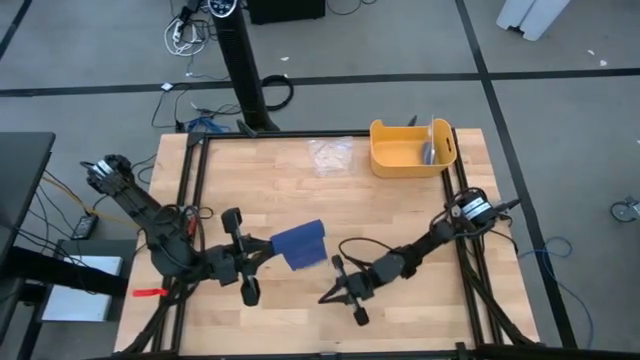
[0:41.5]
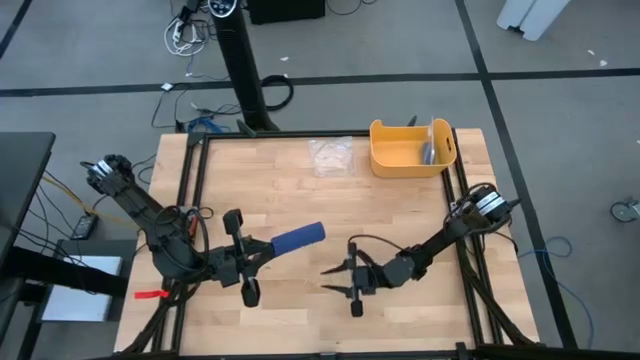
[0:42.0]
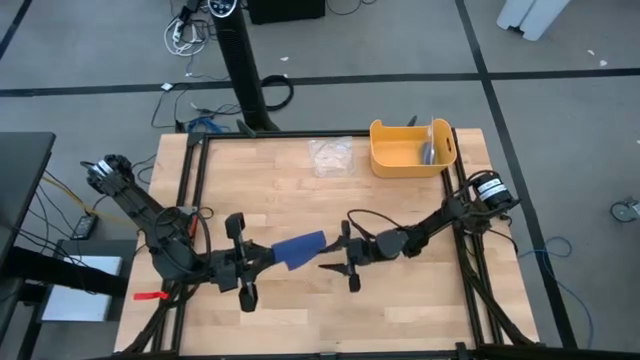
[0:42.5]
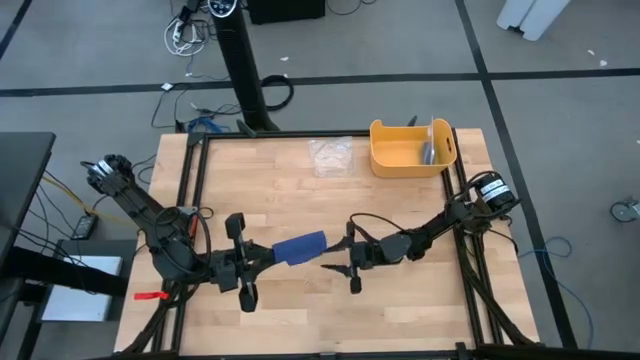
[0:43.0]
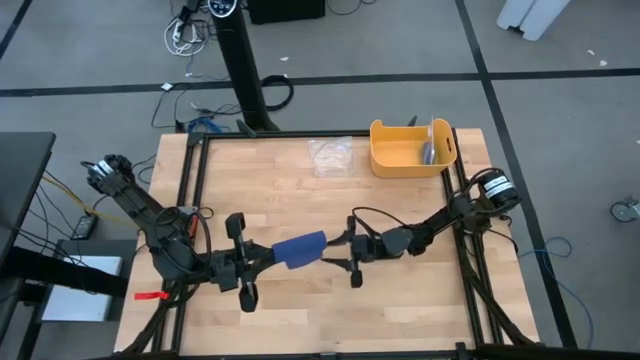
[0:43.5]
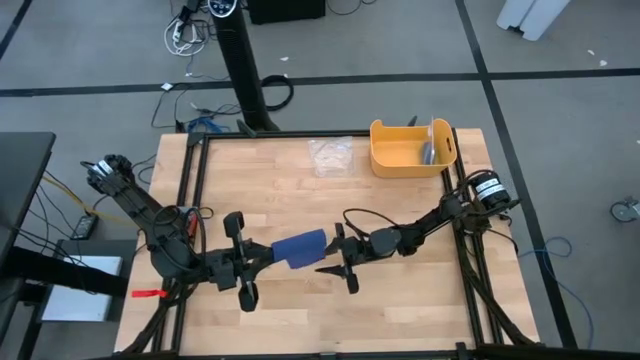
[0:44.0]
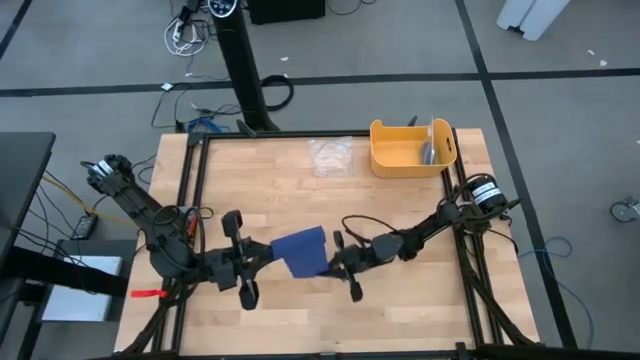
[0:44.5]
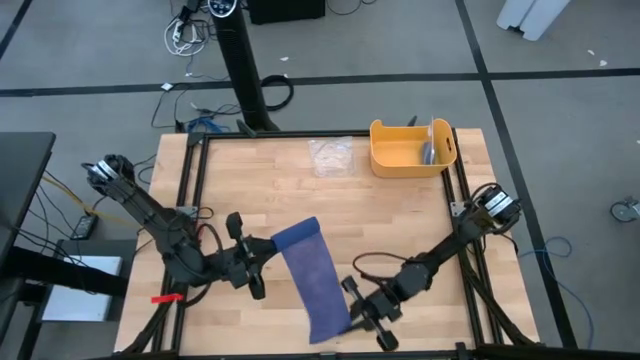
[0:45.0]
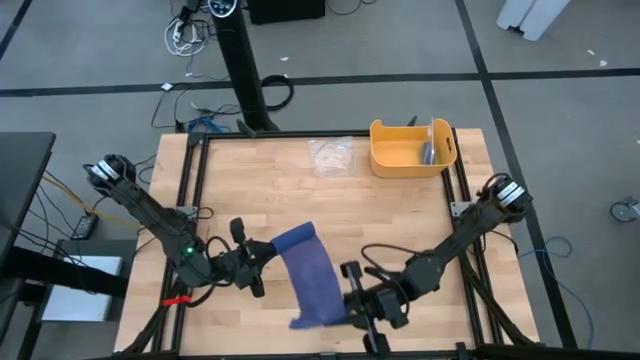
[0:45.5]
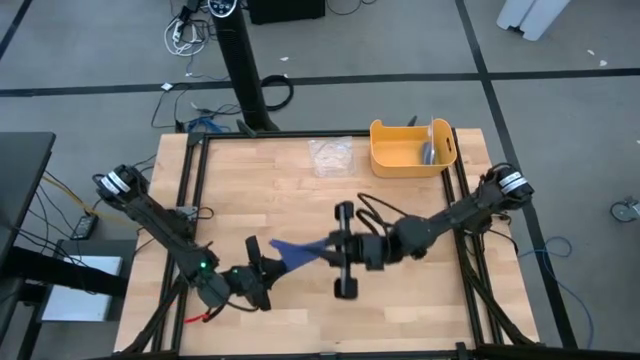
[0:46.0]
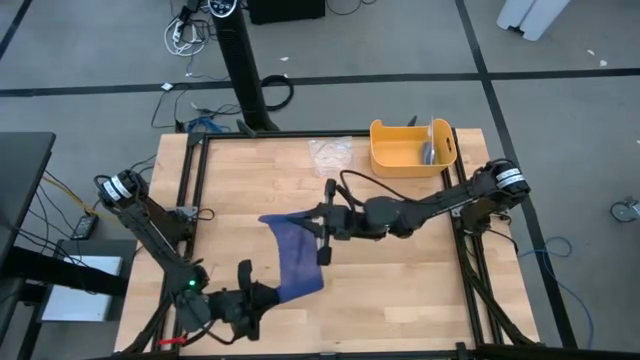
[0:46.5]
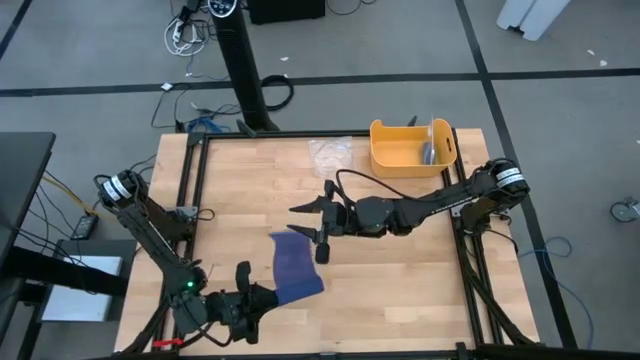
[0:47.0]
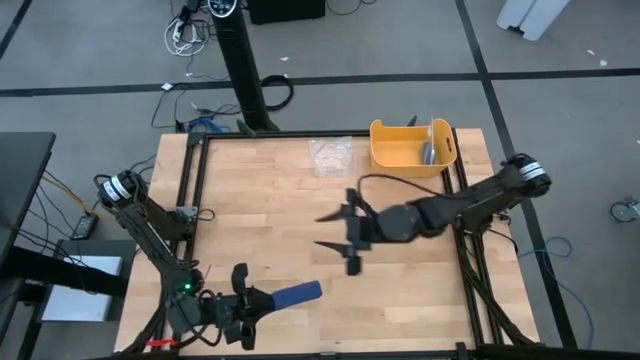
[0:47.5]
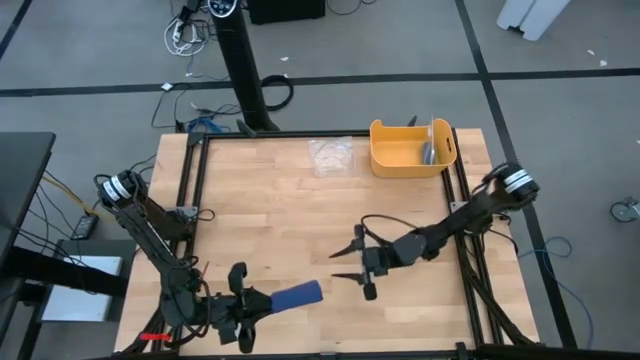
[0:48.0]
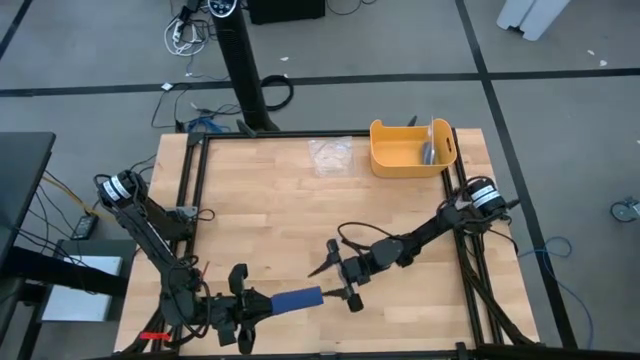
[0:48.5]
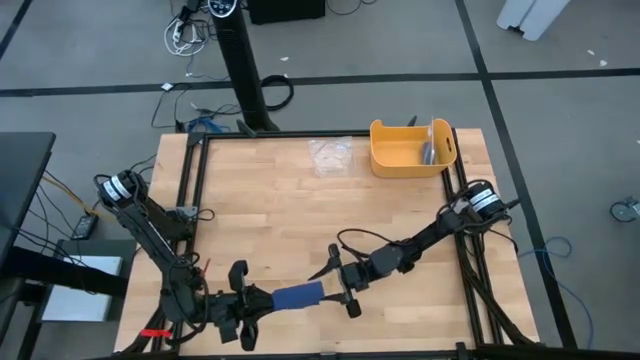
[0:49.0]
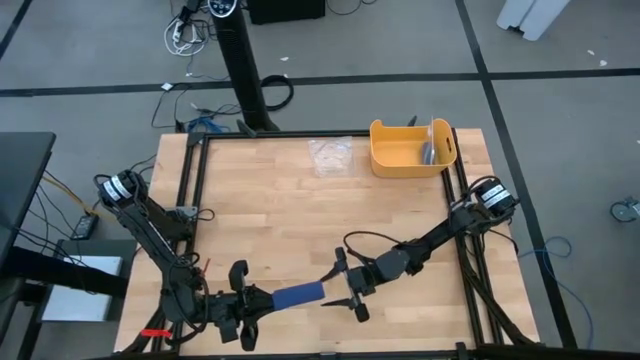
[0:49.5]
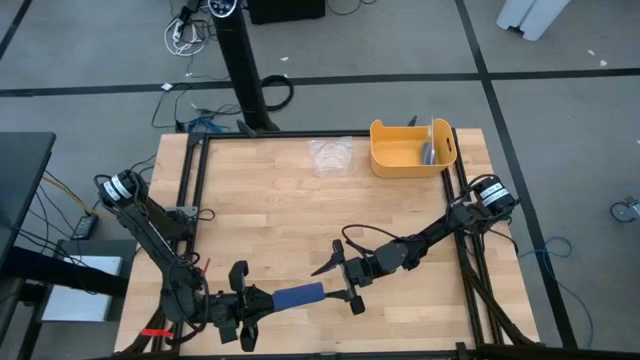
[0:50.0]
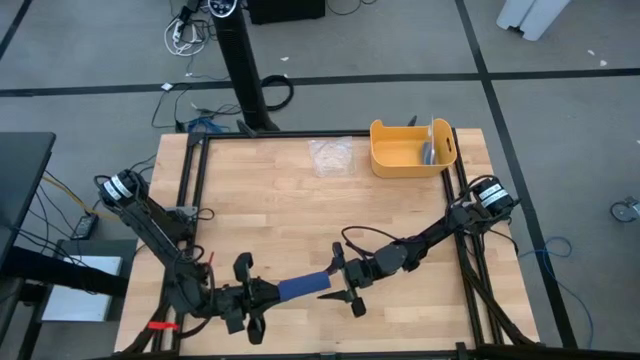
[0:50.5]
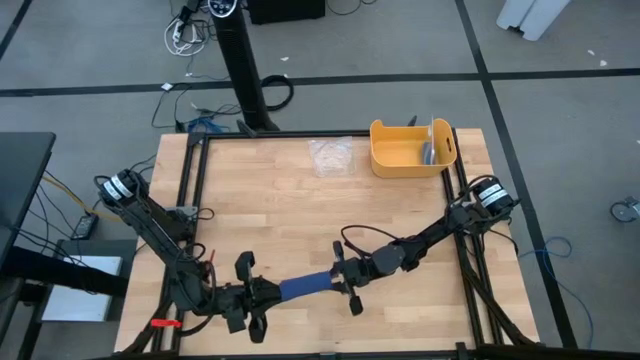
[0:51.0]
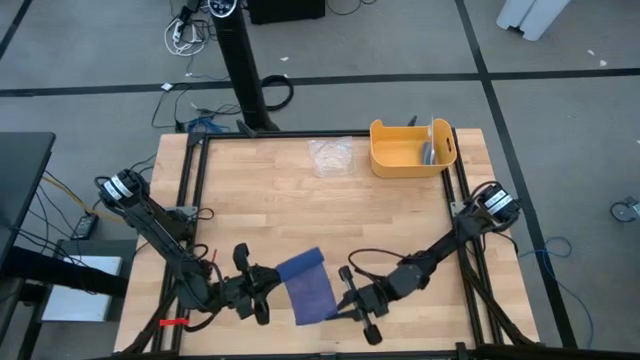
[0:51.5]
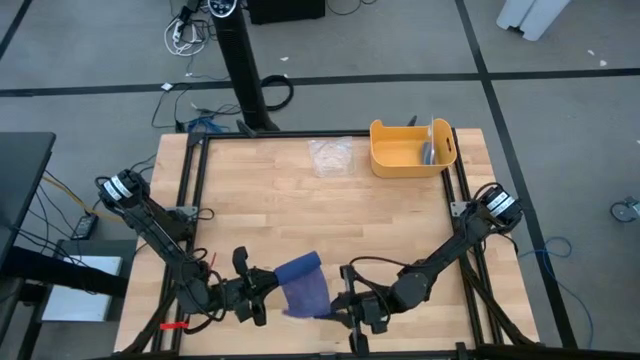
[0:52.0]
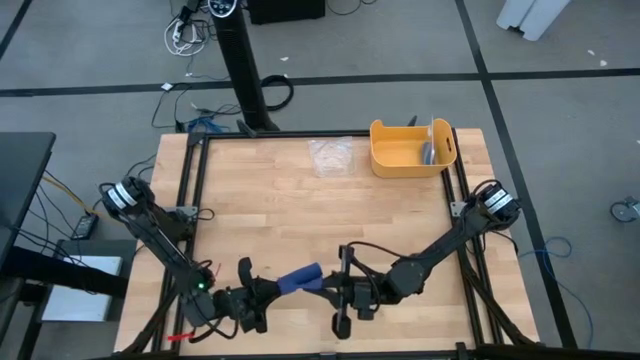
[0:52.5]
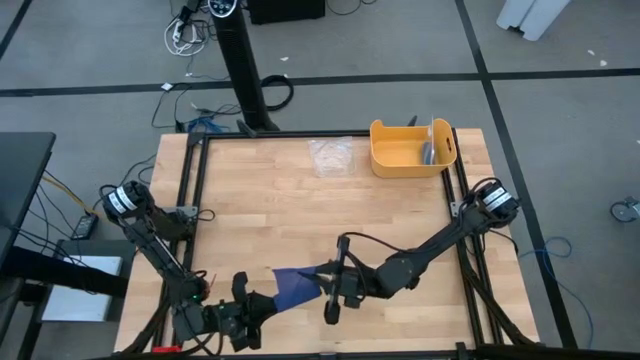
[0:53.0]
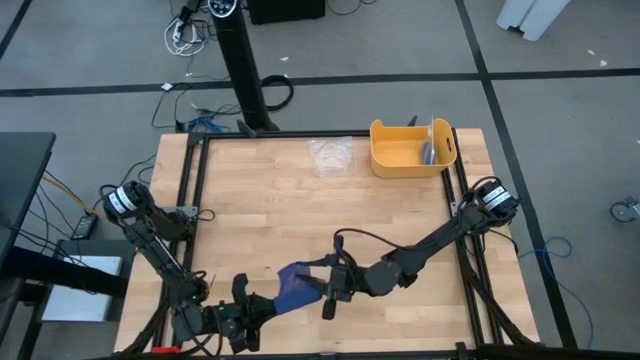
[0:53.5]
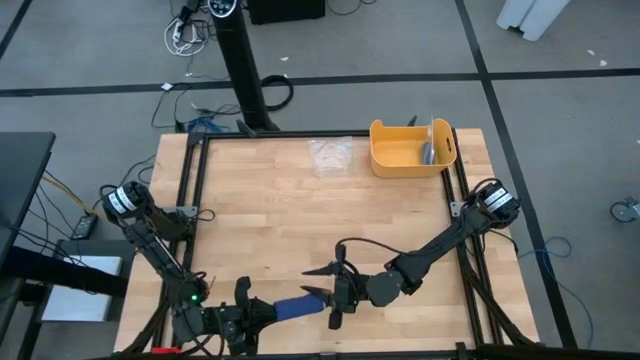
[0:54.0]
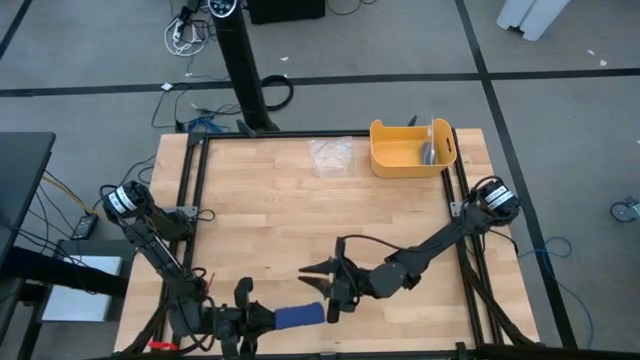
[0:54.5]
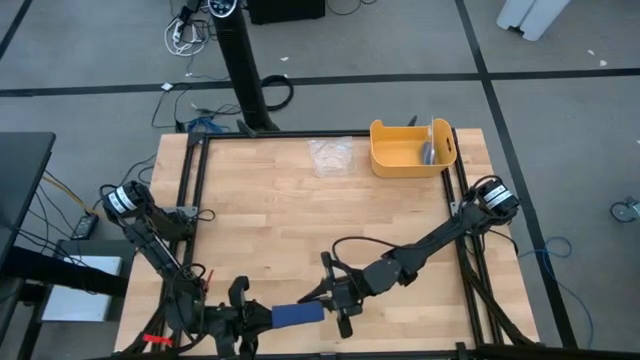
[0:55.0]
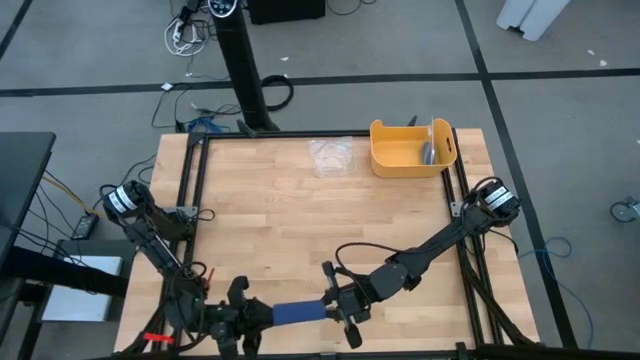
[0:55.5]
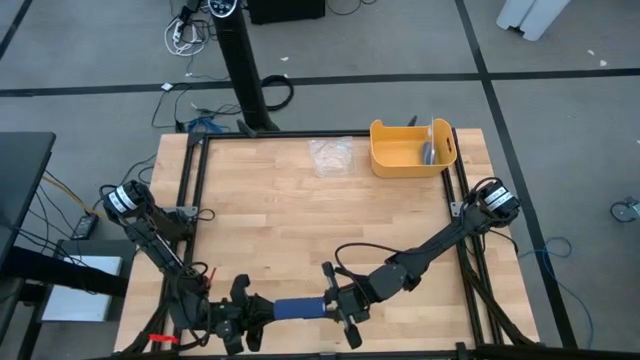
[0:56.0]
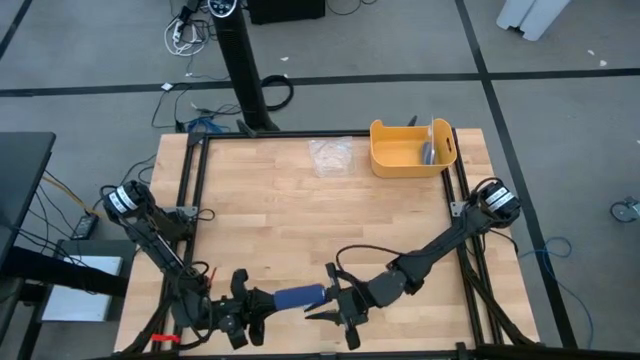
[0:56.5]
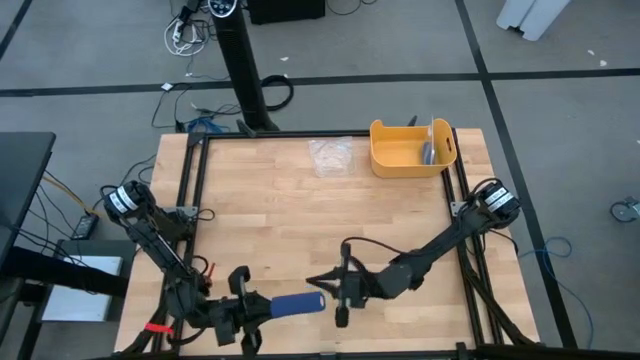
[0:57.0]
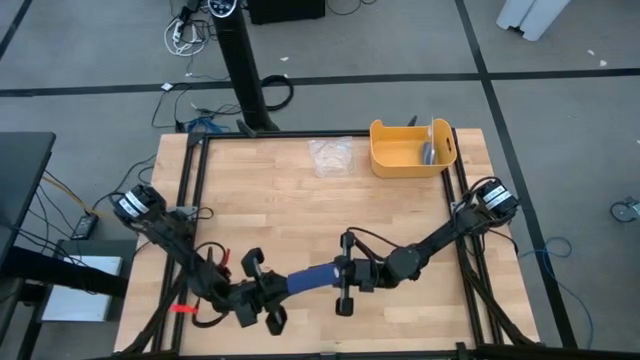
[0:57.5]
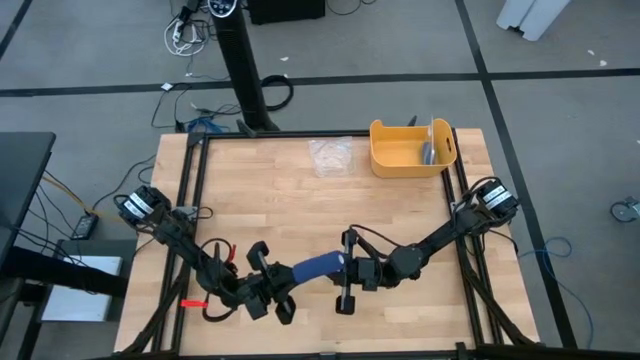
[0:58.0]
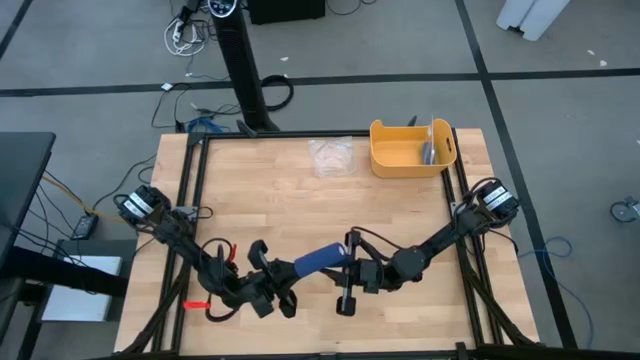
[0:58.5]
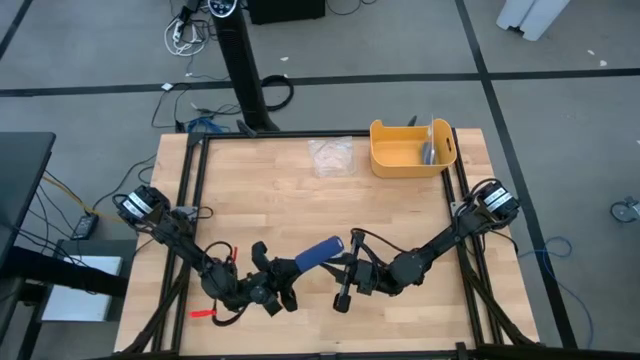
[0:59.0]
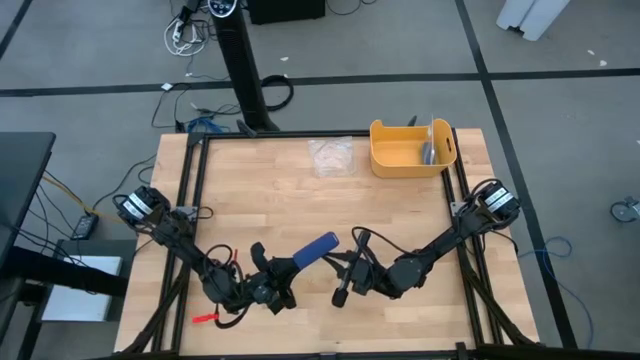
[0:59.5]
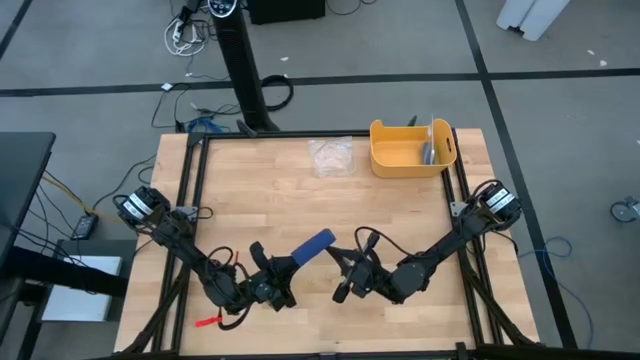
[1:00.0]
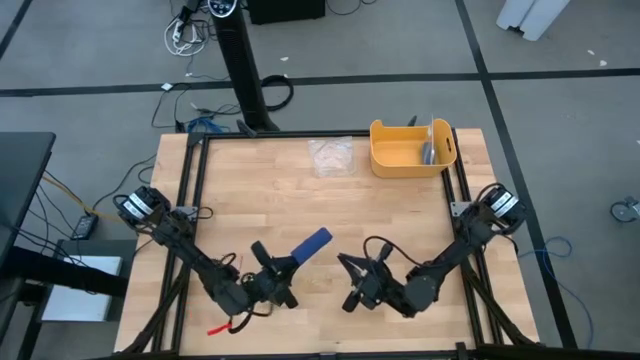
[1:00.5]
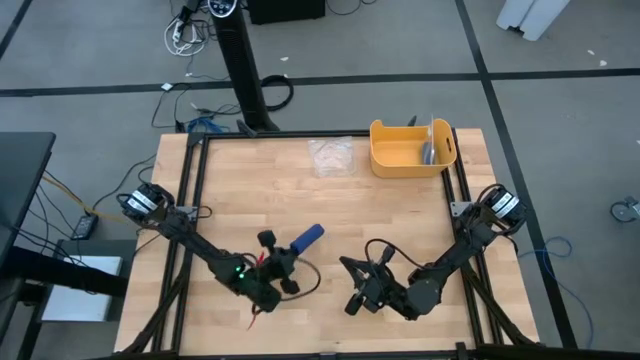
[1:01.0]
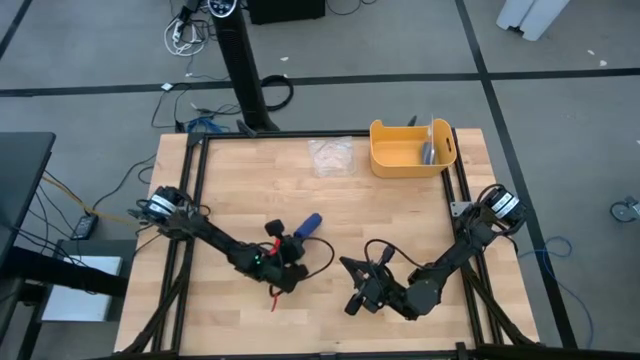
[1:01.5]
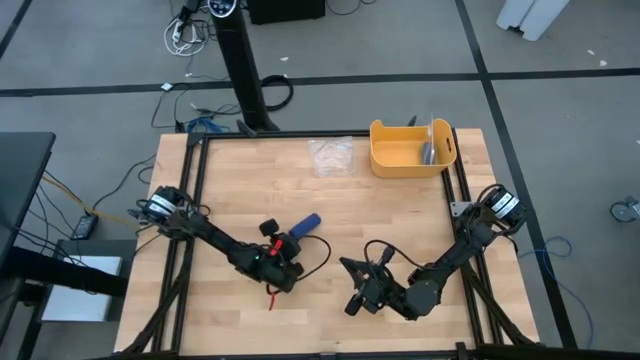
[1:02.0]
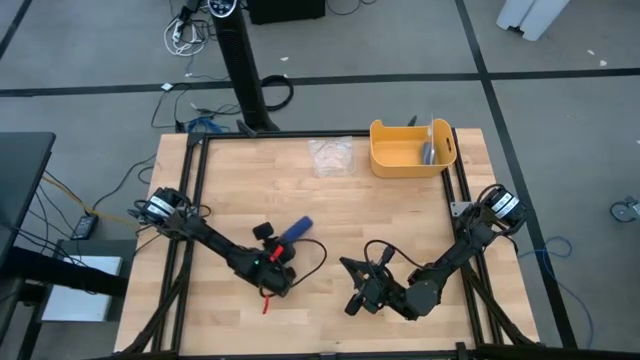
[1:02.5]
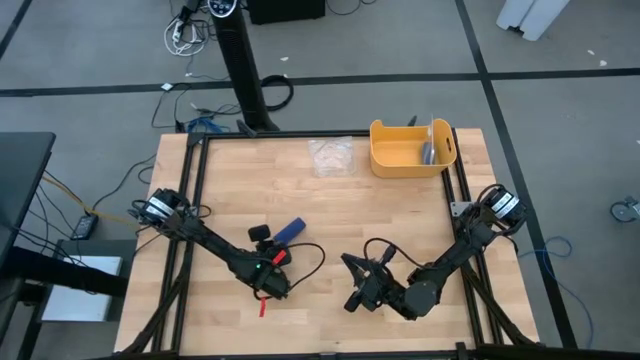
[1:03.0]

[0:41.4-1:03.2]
Task: Roll bandage
Roll the violet bandage
